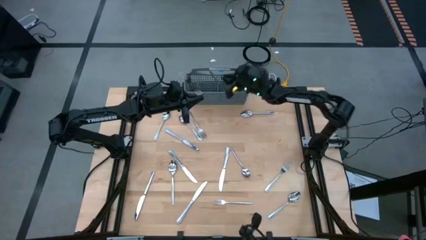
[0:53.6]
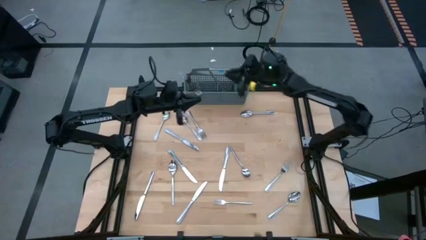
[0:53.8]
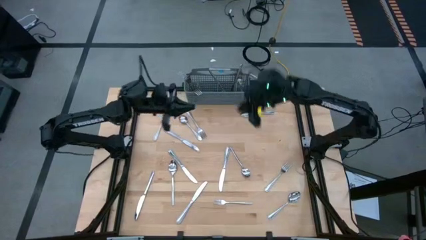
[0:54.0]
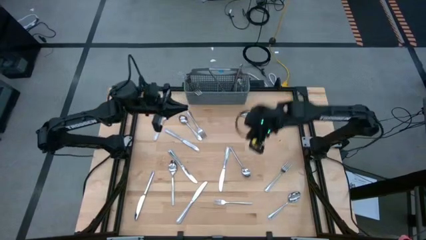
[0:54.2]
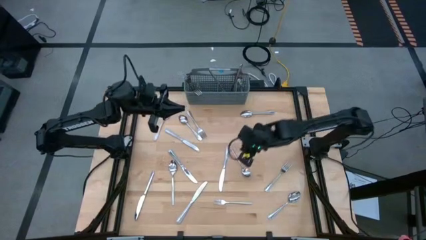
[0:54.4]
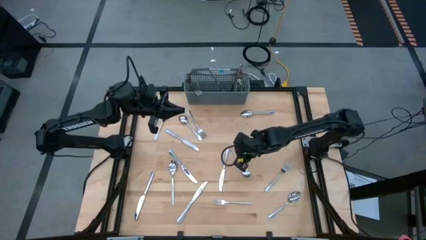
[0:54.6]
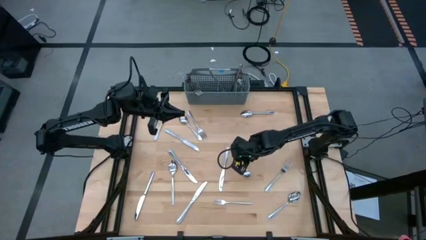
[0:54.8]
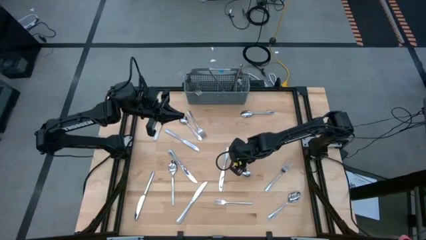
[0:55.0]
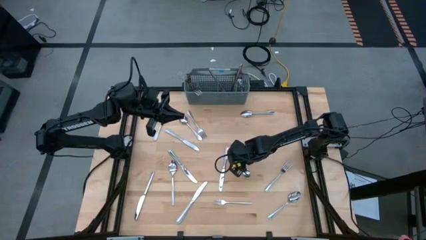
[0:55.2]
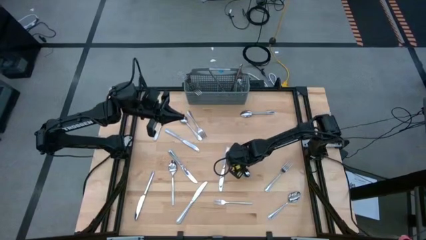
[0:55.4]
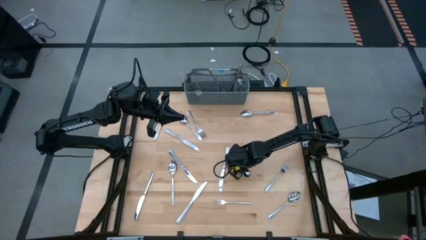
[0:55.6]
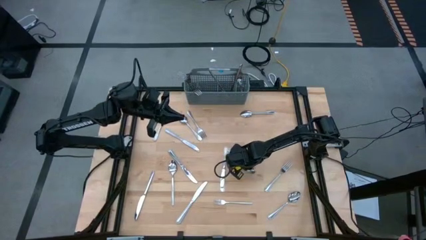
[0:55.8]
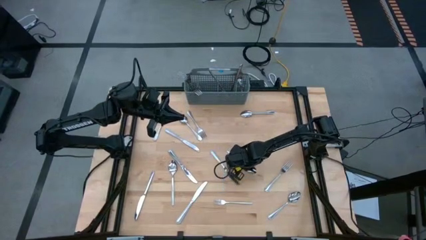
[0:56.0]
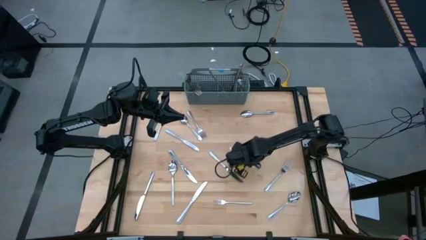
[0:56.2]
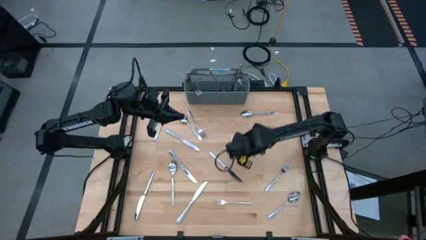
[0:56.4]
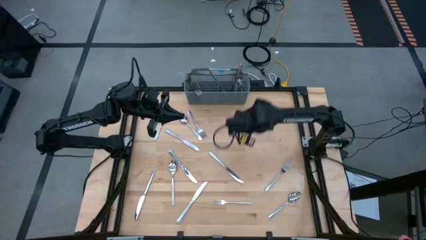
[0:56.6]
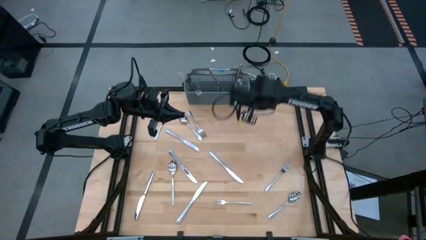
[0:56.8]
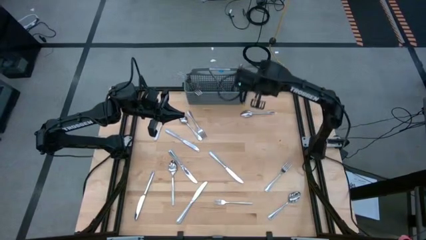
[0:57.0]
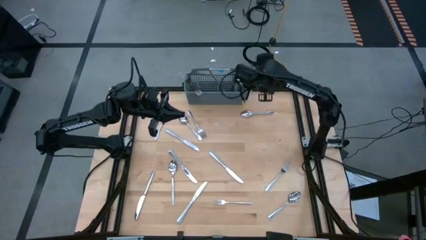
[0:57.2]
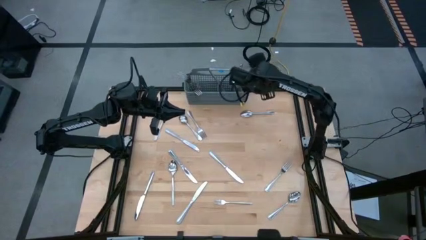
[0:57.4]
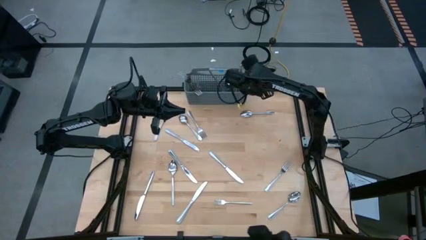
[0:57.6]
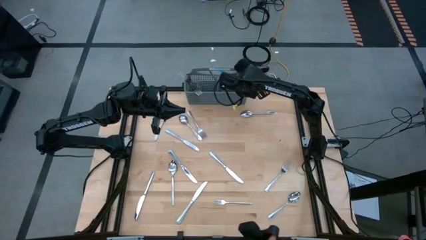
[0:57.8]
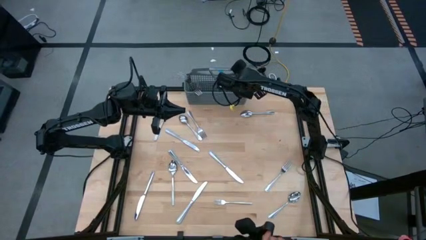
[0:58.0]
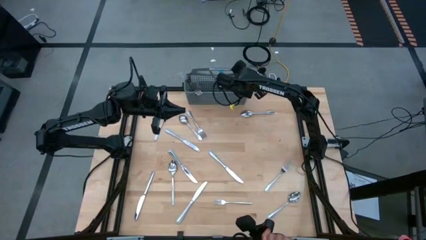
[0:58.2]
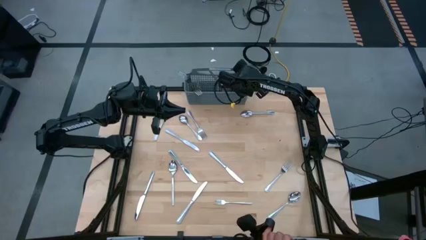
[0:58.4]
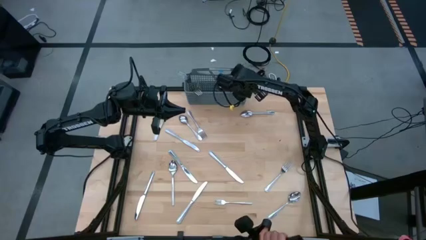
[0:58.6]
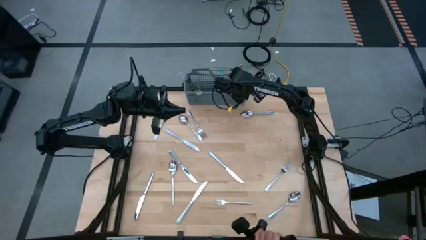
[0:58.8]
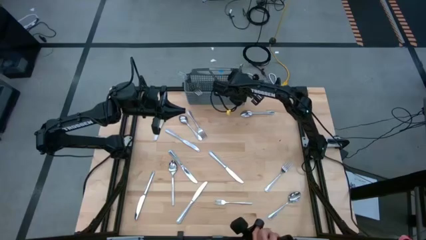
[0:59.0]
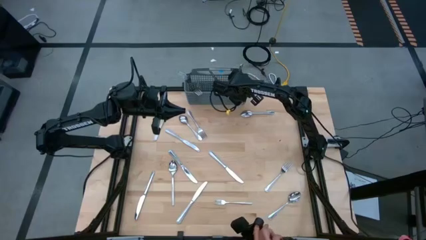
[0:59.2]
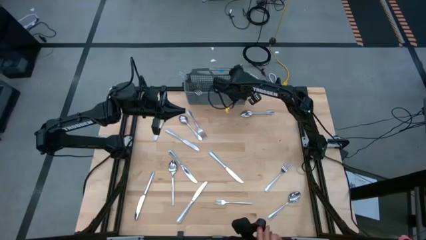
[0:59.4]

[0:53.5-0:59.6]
Task: Sort silverware
Put the silver spoon into the silverware organizer

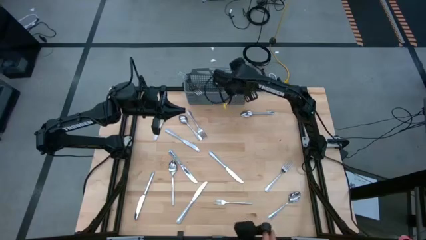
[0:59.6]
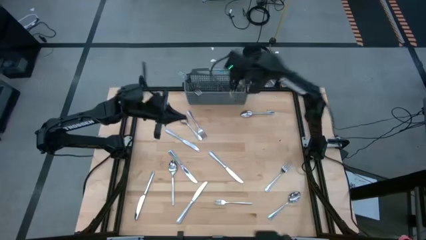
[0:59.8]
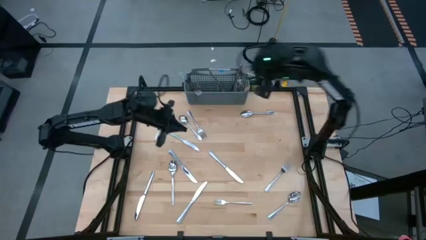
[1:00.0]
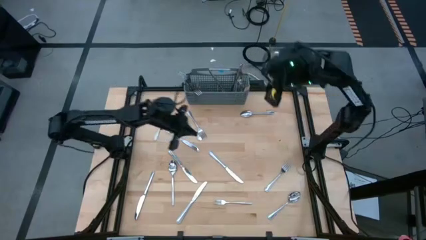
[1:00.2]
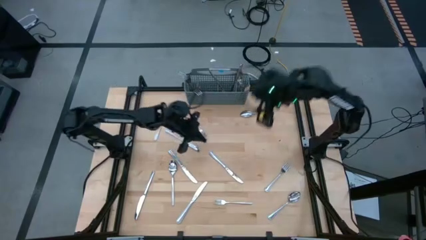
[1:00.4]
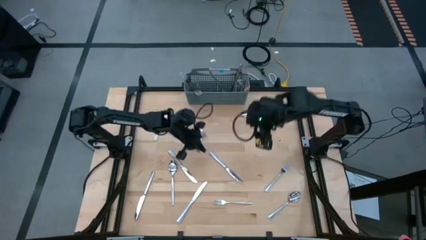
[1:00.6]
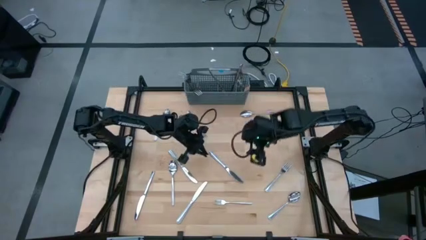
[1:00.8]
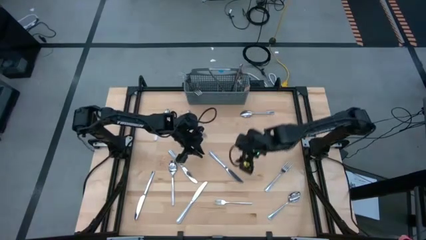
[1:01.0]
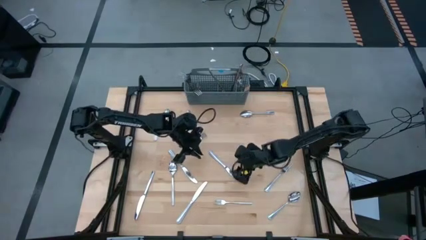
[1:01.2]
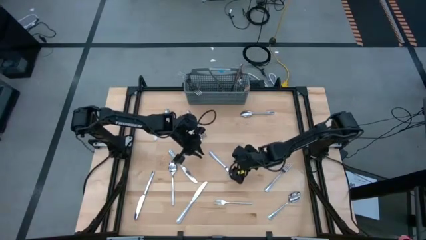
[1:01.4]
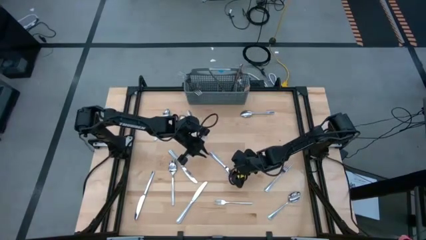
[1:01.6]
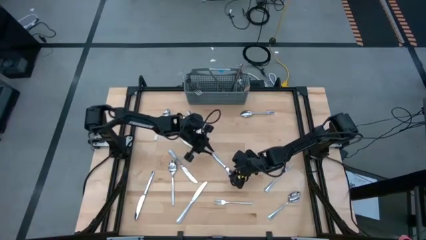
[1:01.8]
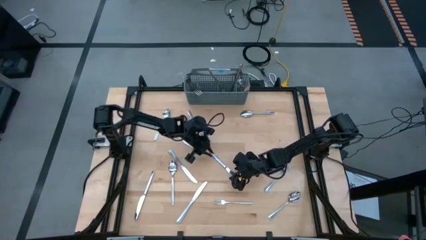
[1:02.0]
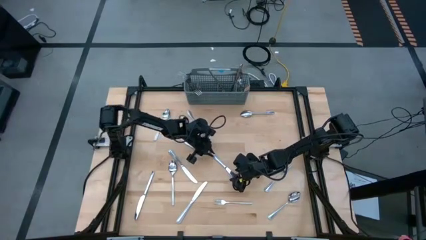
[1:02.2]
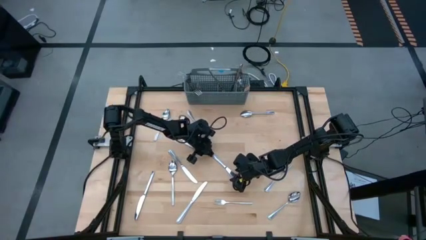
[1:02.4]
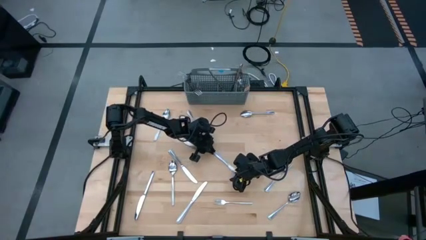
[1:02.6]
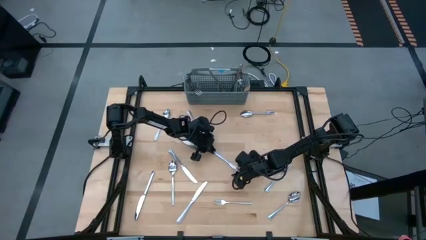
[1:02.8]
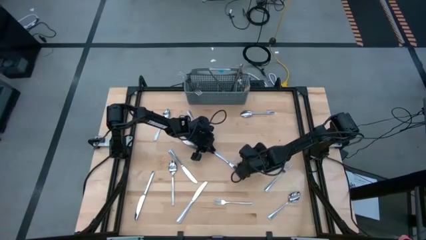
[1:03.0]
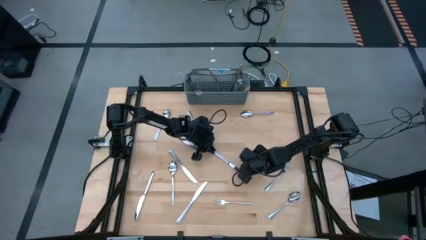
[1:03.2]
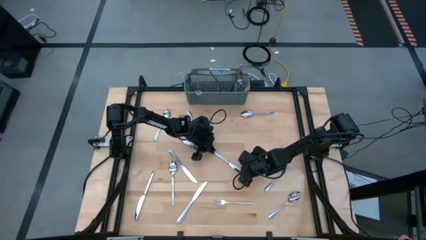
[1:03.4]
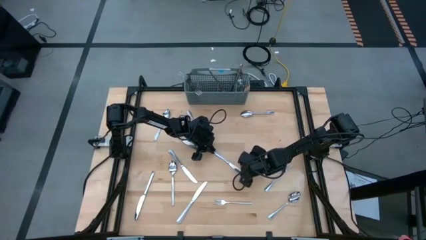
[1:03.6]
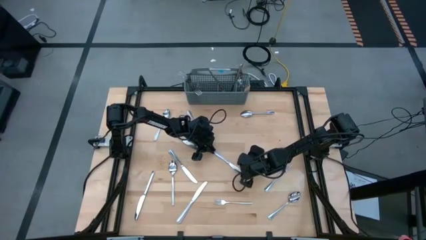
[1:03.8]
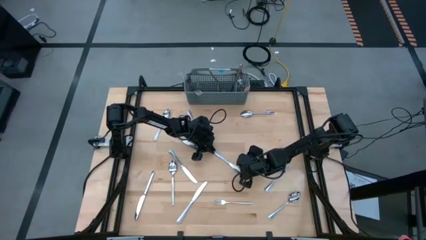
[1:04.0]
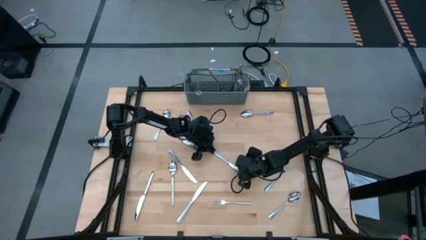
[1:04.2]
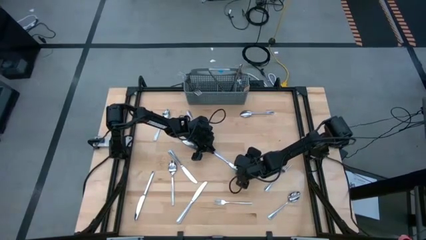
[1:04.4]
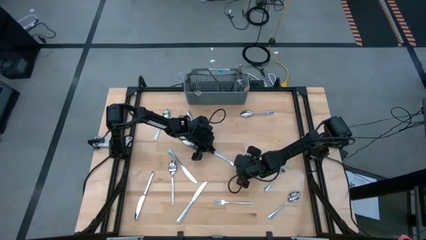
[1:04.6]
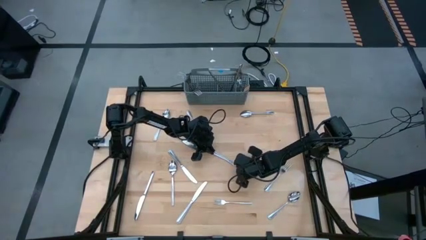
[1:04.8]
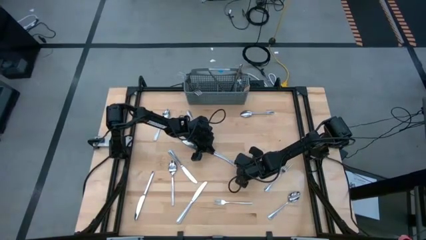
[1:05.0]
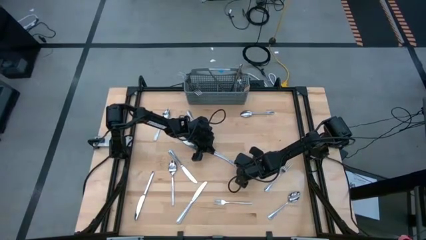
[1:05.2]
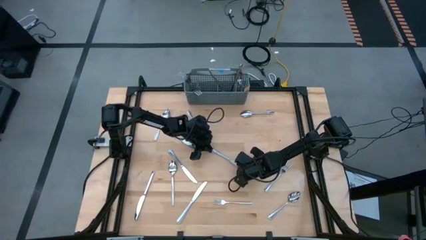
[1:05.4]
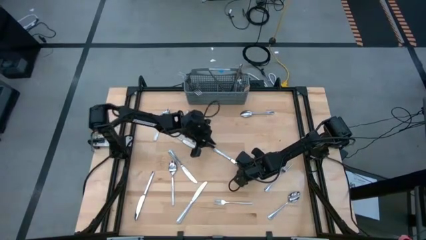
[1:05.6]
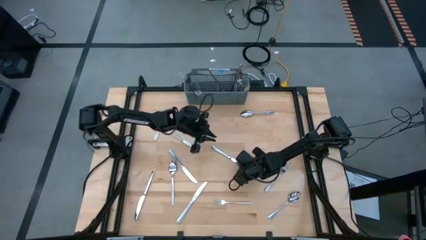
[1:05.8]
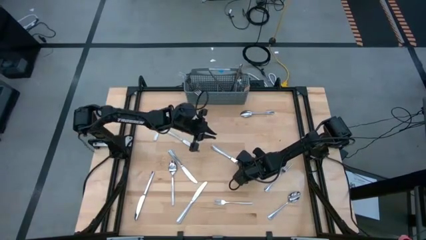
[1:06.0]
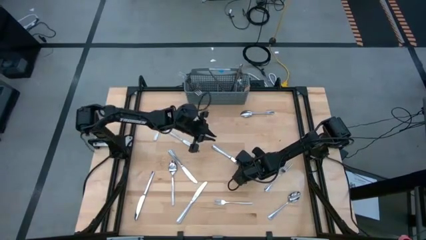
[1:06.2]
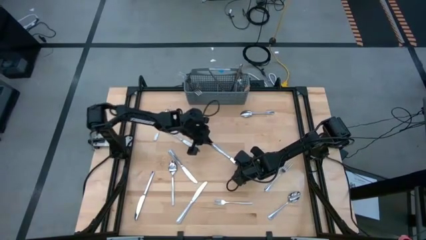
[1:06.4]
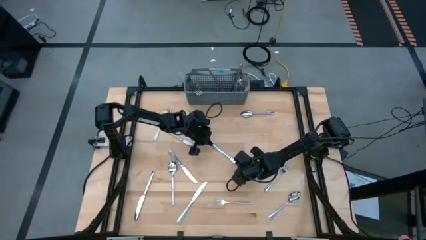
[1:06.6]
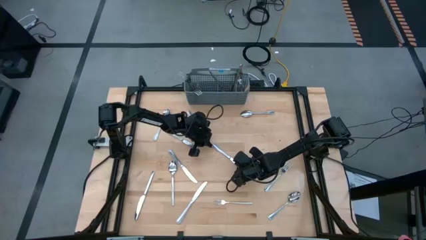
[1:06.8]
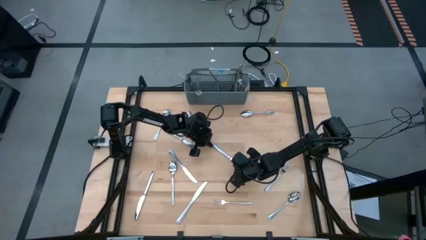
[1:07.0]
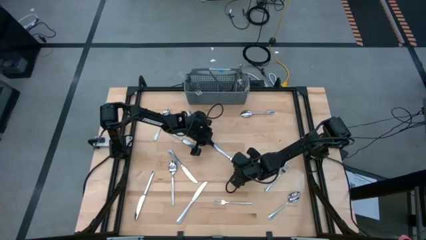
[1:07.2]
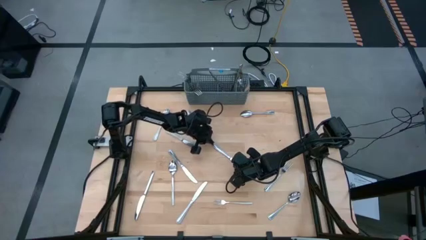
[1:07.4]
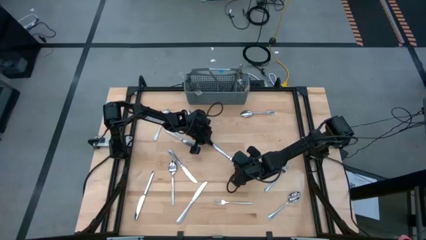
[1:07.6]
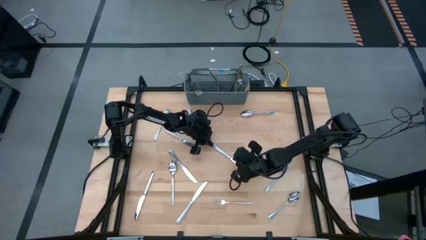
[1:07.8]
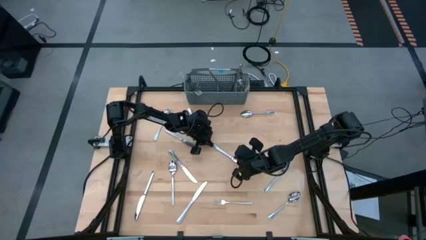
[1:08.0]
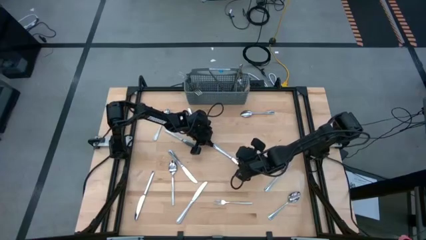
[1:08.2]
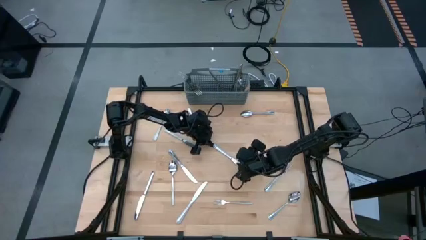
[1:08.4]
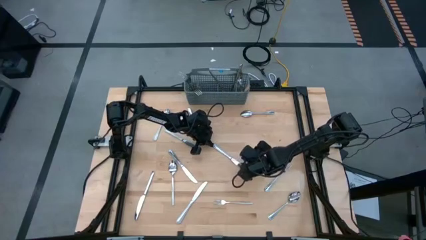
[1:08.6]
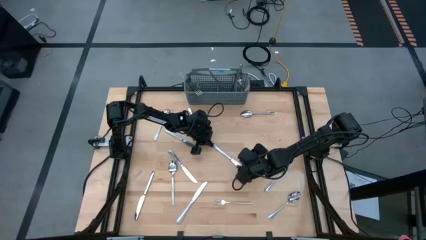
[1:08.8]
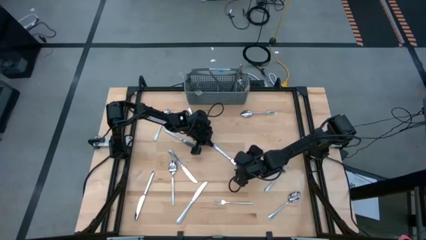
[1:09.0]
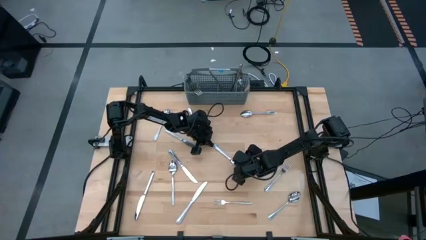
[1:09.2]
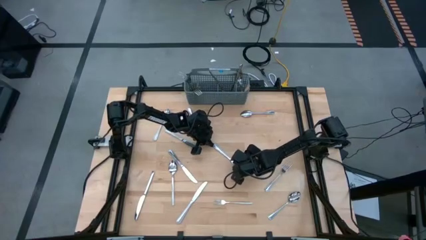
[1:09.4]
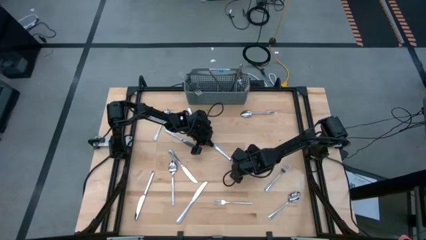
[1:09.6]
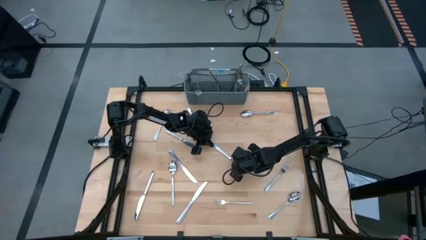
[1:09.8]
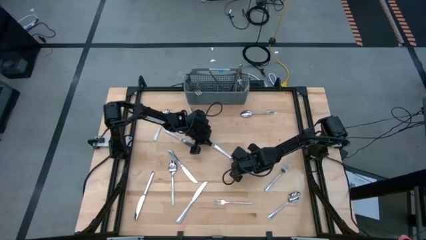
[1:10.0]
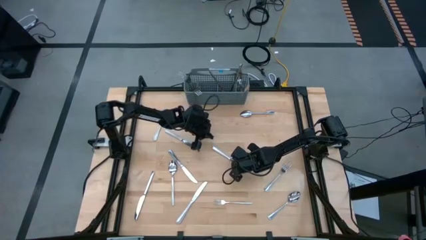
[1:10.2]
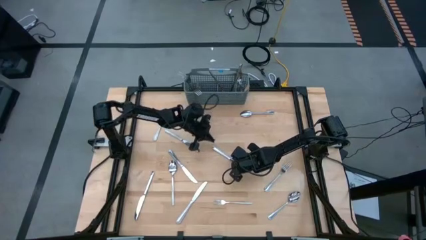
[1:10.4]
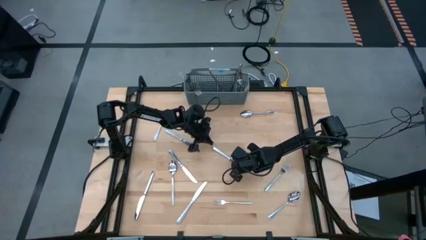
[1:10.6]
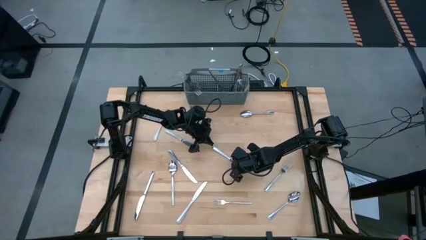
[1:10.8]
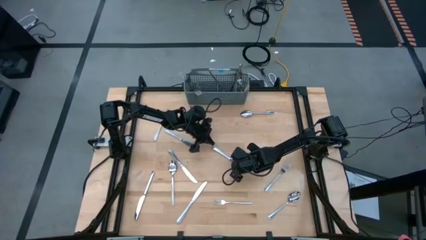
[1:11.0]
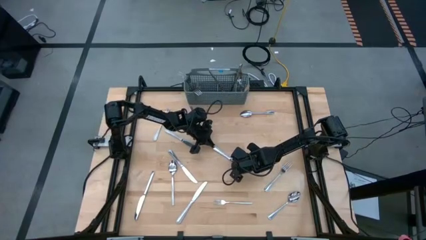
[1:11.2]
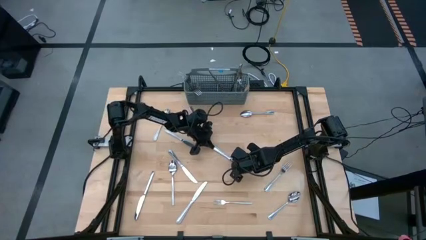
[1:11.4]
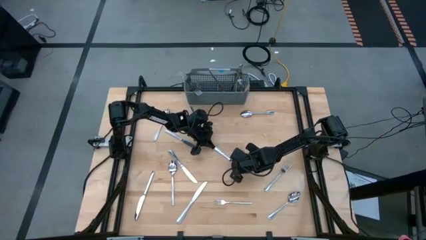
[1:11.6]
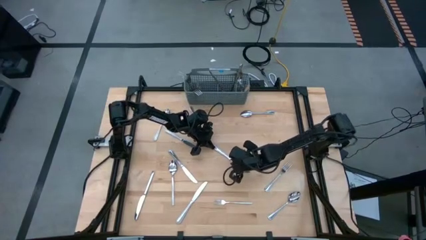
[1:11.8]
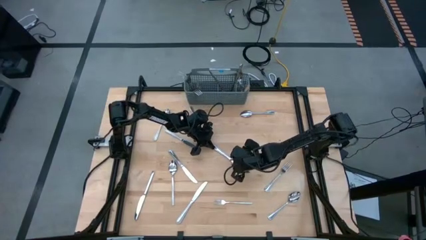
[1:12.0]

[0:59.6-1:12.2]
Put the silver table knife into the silverware organizer
